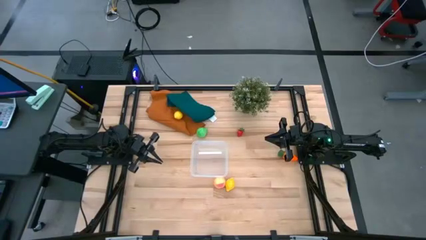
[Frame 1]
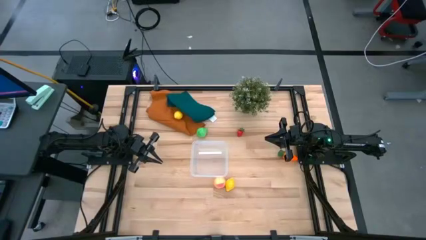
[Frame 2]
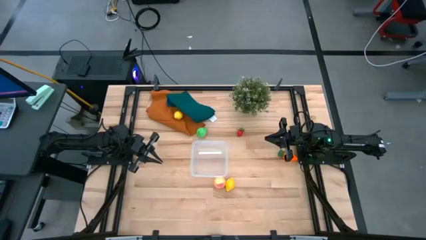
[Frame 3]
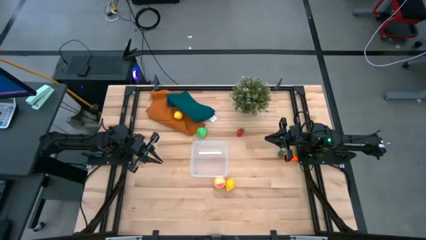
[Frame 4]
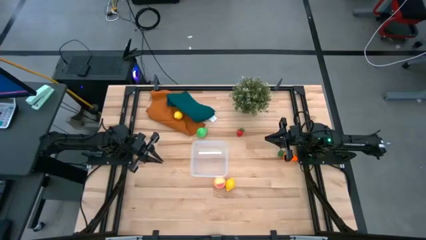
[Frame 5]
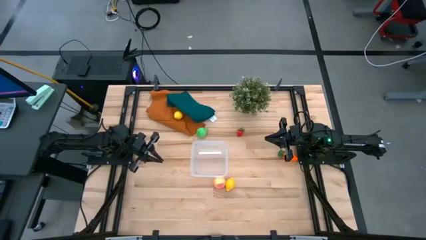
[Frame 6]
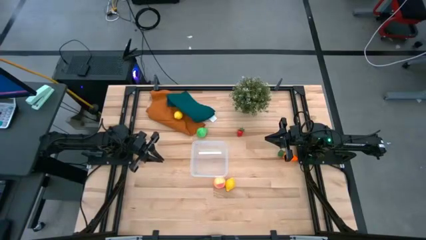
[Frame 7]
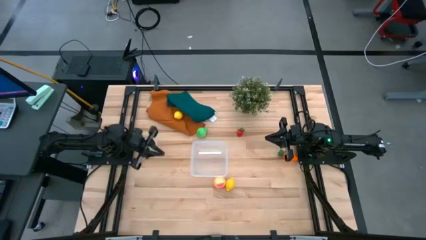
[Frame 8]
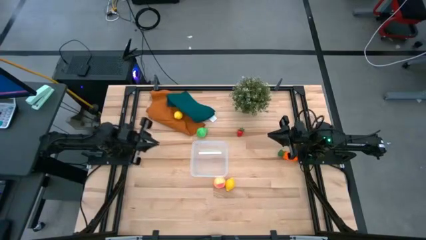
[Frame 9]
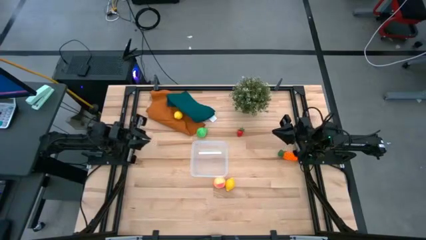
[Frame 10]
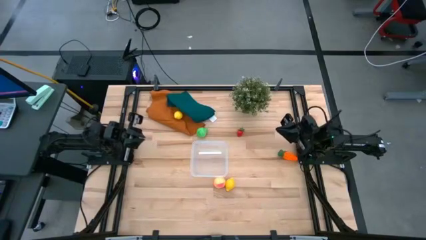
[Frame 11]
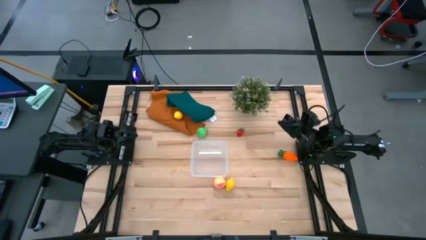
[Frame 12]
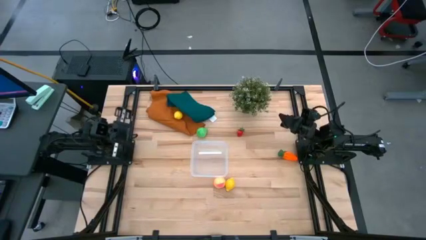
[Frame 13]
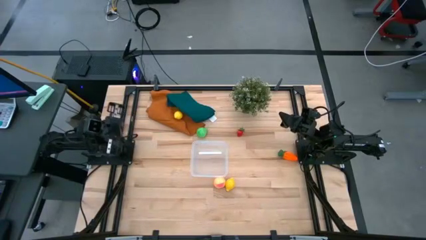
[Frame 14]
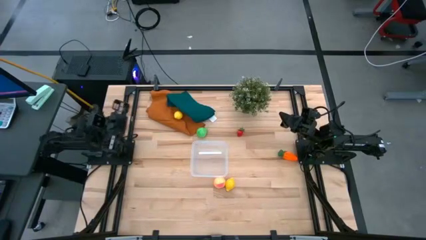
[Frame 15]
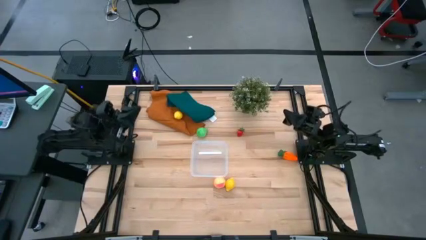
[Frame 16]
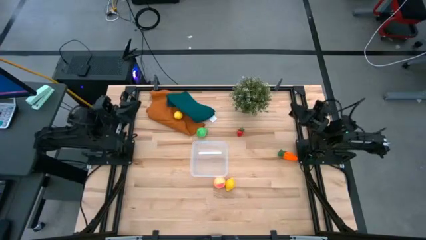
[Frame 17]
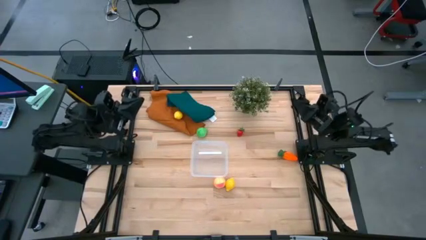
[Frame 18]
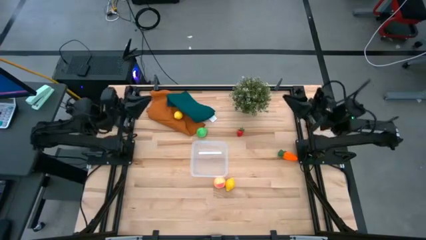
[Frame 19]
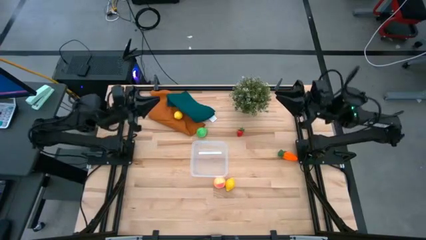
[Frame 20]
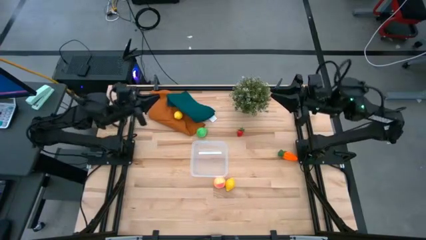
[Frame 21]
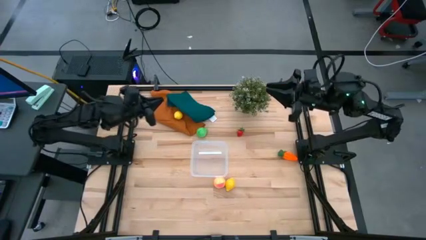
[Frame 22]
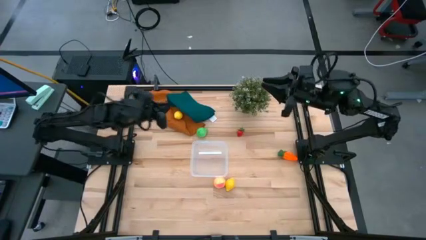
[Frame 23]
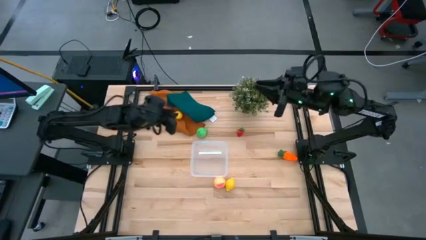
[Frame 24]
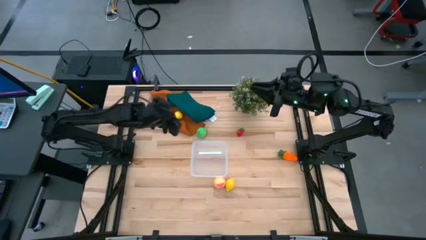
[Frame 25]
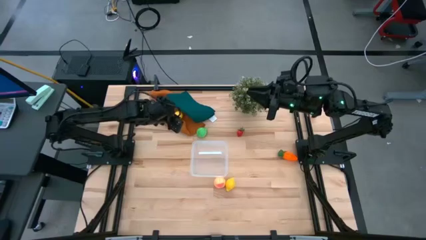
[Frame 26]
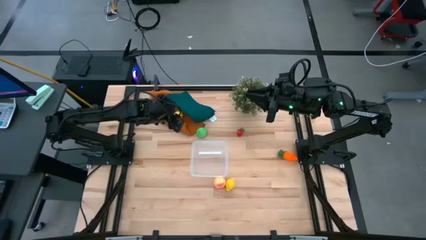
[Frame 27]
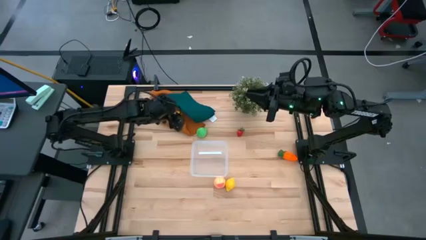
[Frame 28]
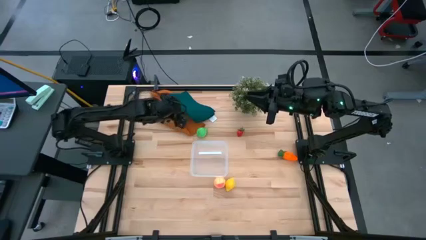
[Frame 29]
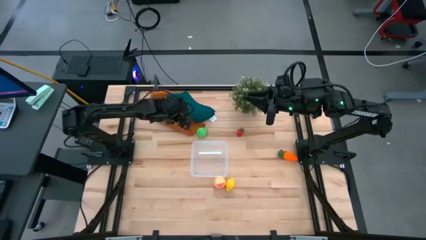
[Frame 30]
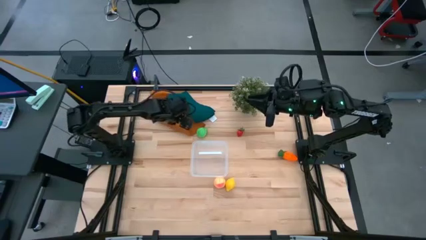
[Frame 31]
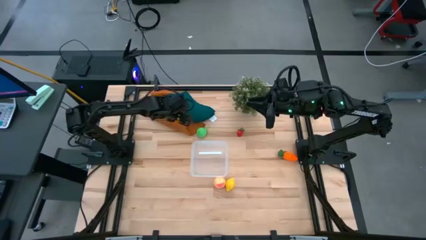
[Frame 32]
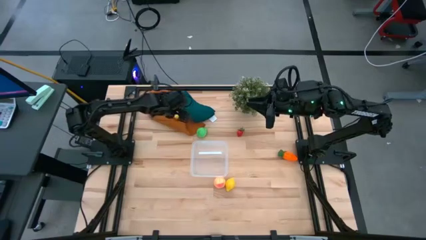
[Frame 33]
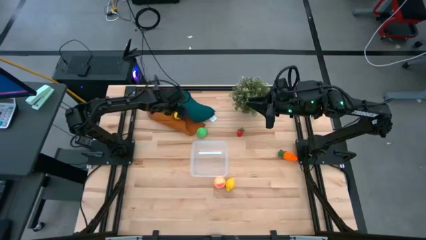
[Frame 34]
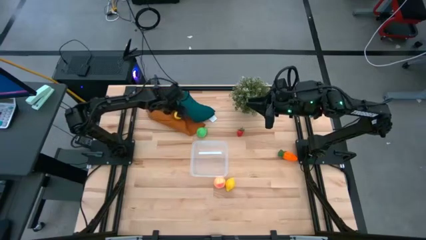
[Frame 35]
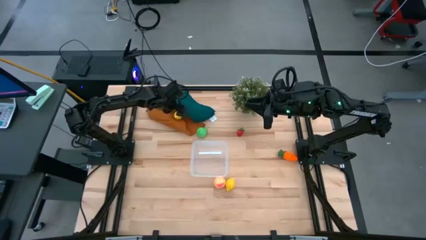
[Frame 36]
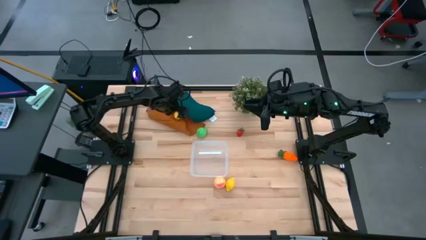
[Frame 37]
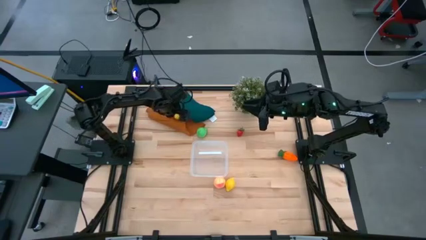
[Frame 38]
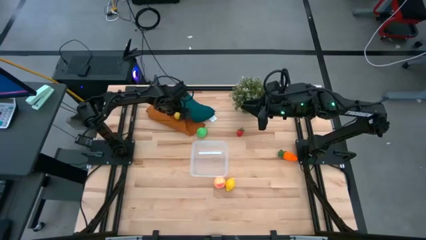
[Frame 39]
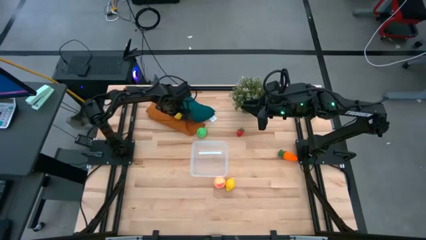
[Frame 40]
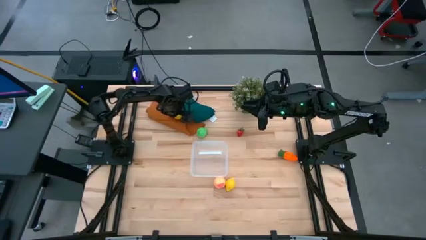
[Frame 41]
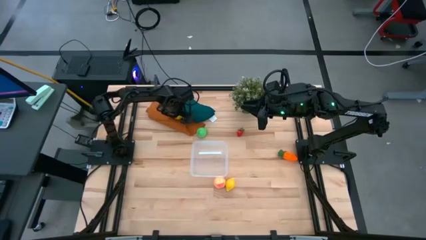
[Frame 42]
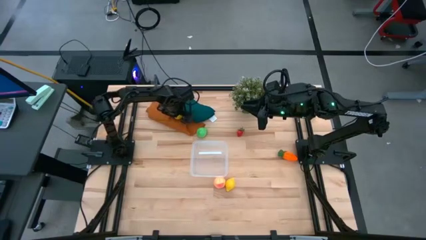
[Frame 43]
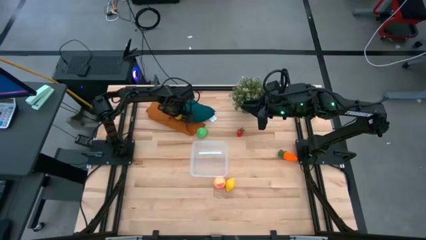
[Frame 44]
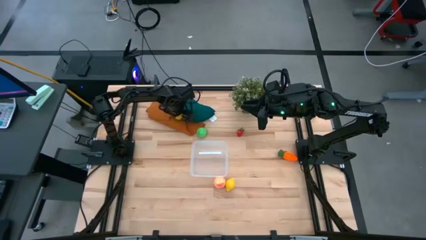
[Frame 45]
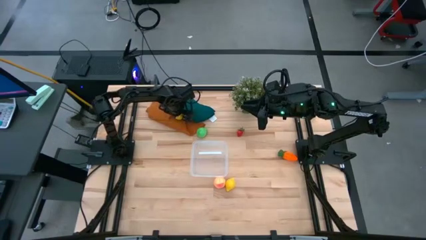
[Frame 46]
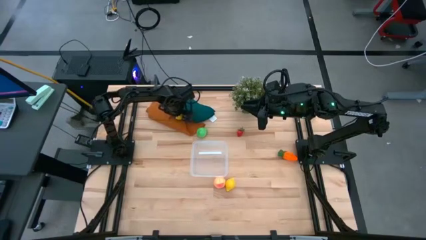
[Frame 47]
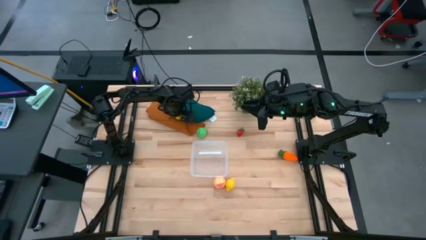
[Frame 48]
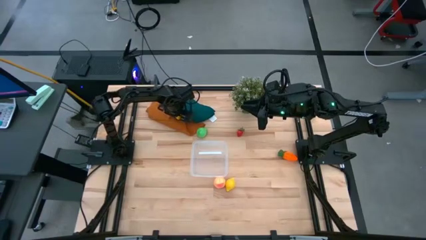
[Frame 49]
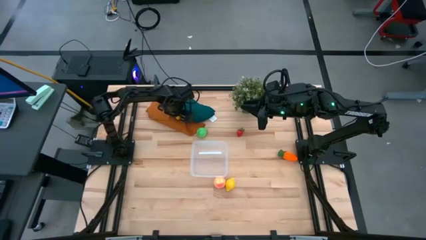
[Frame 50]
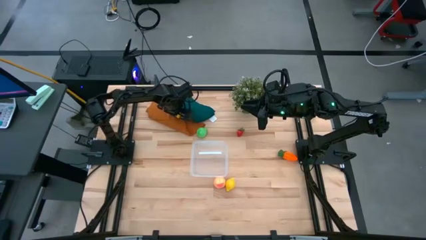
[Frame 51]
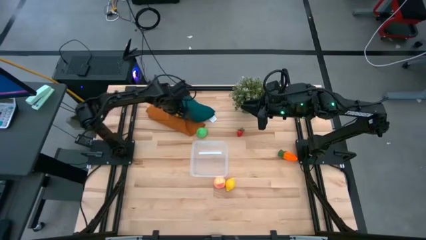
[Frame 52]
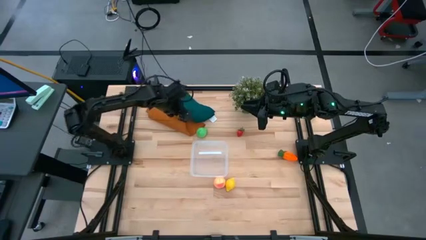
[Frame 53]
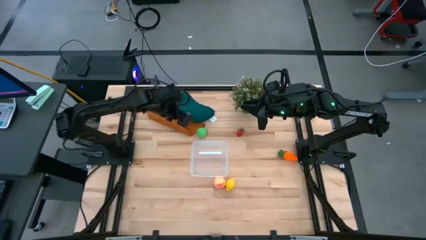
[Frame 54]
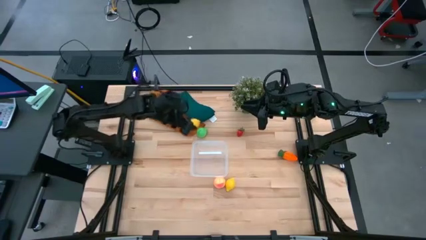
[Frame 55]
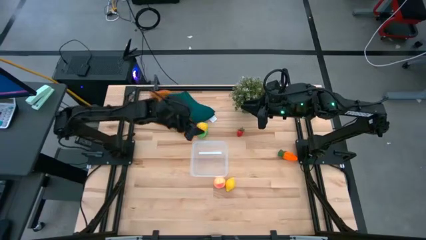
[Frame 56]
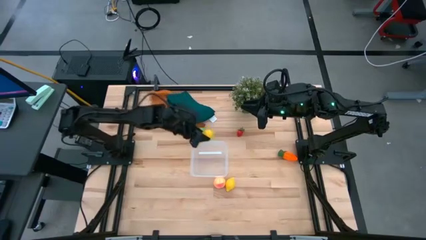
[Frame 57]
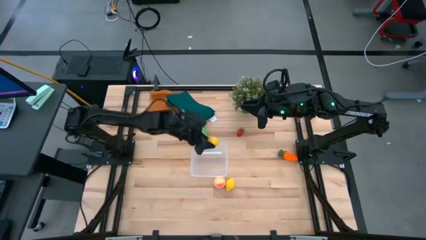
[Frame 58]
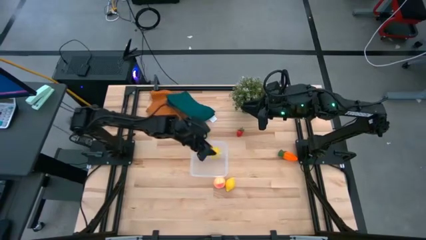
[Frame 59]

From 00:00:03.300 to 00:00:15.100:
Task: Pick and placing Produce into tupperware
Put the top yellow lemon into the transparent container

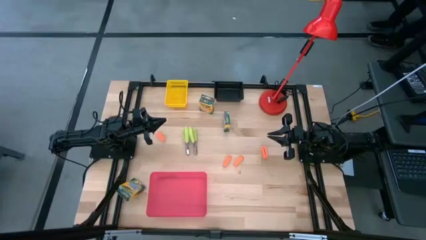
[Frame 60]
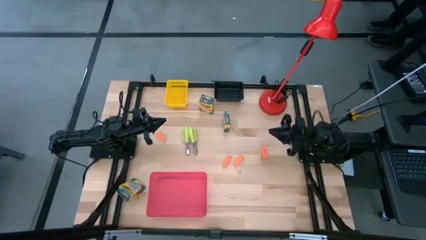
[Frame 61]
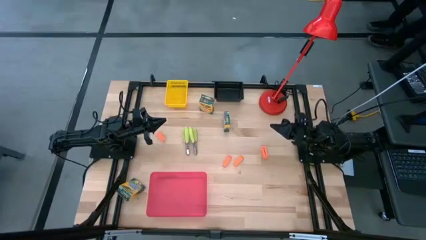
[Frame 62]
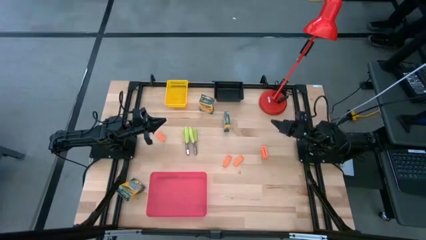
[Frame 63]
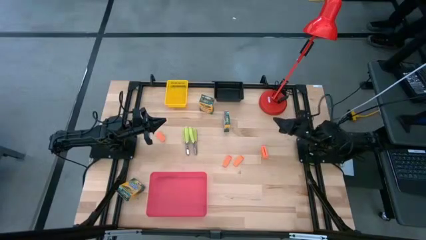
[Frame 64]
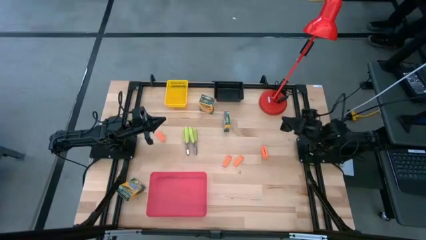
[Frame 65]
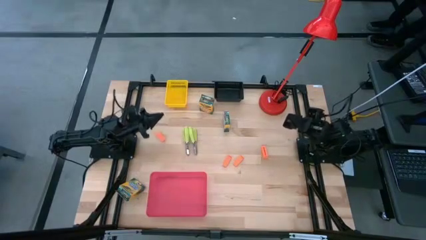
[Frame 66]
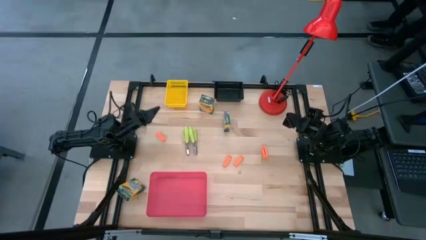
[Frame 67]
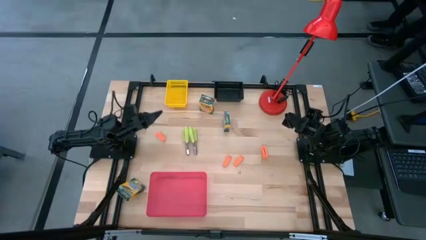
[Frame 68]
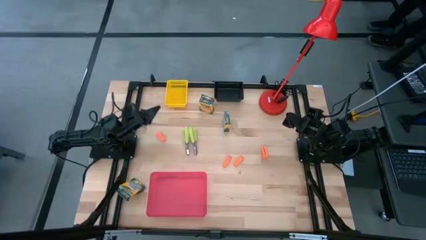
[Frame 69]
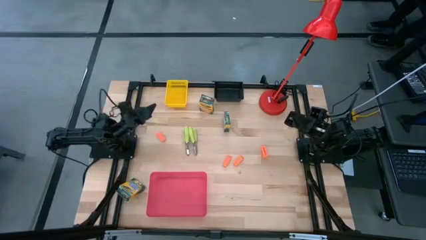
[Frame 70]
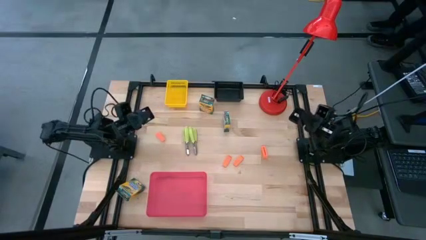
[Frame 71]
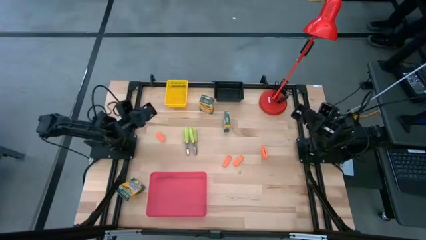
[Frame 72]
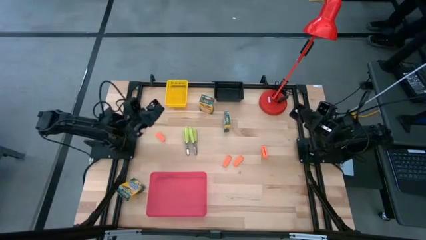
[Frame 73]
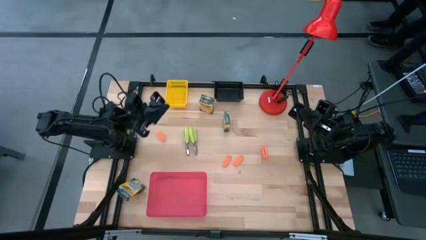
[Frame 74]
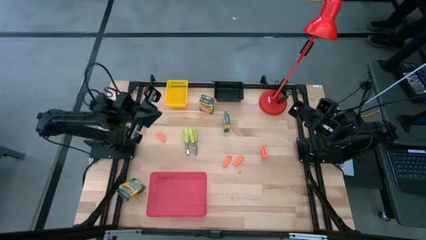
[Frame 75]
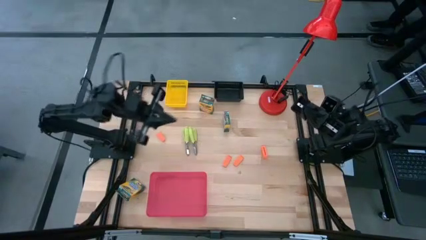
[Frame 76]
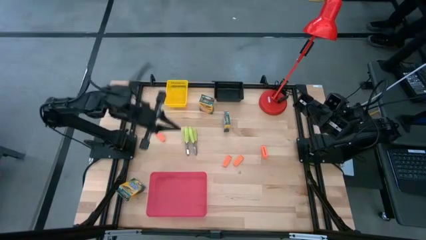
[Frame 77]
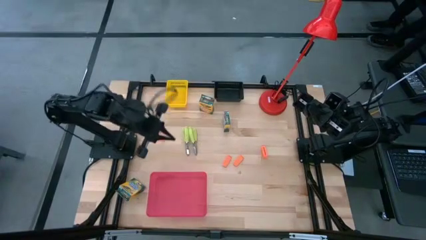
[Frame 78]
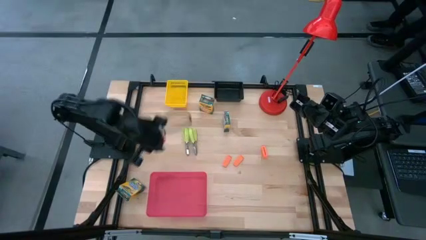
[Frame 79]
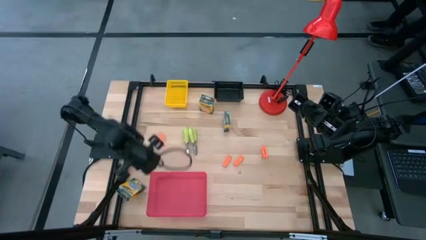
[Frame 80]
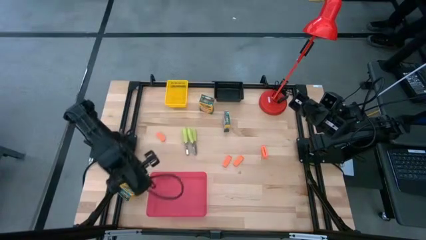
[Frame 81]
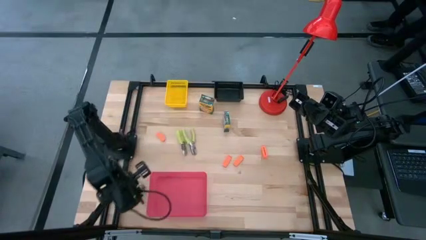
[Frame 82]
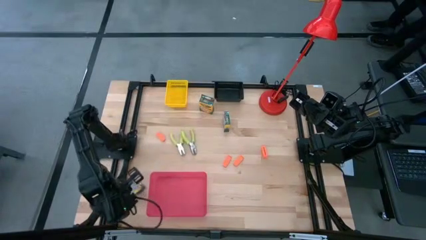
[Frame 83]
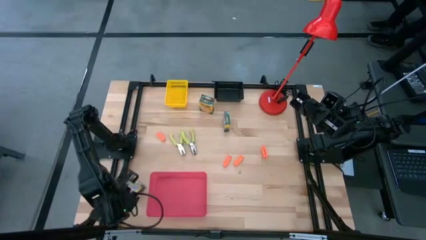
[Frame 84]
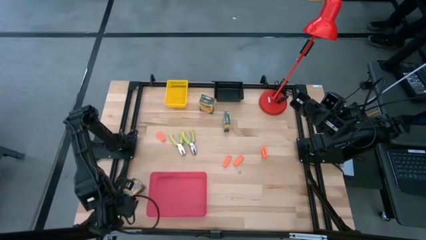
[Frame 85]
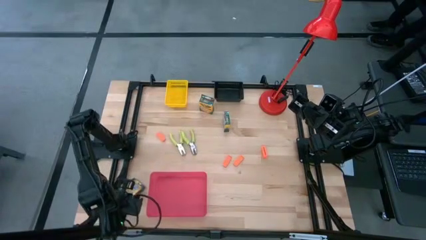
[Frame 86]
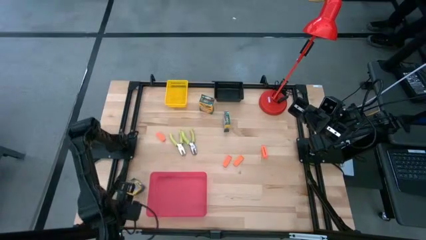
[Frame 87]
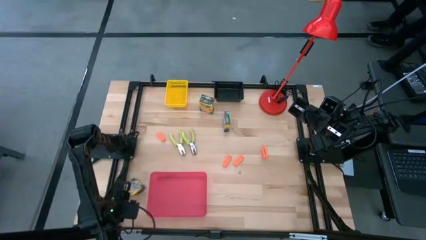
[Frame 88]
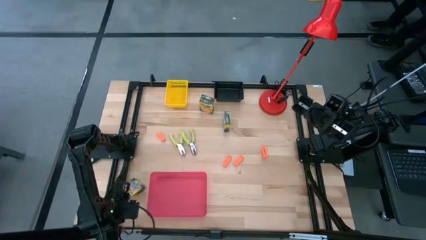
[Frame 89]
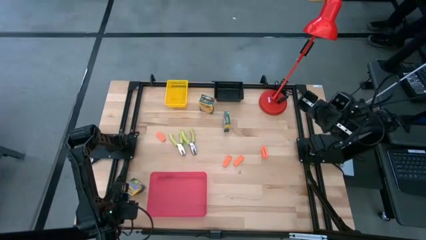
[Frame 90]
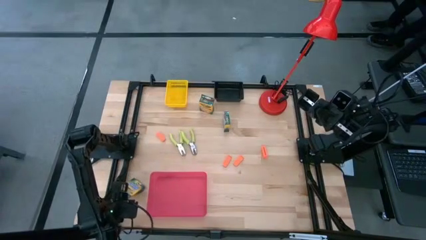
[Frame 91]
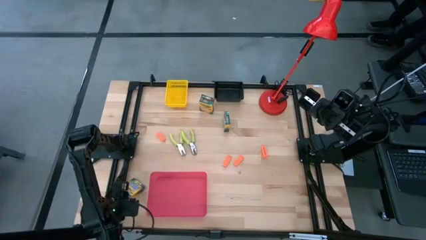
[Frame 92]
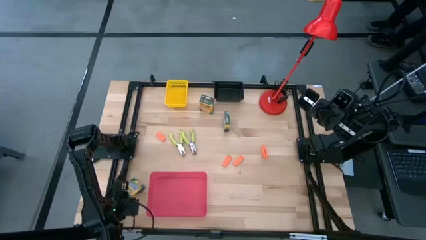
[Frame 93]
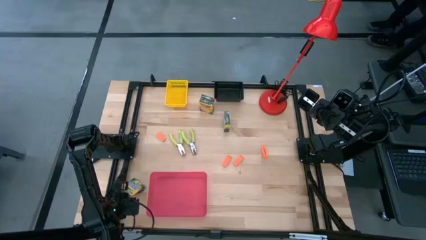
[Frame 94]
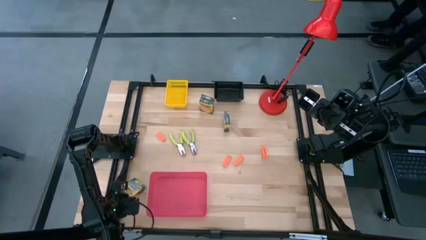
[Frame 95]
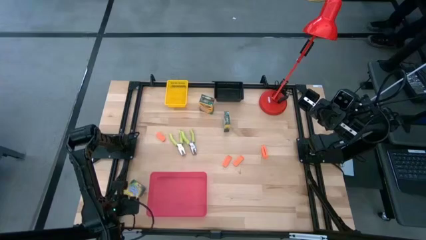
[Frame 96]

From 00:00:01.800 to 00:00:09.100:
Task: Pick & Place School Supplies
Put the yellow crayon box into the red bin
